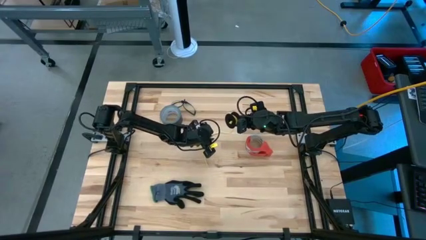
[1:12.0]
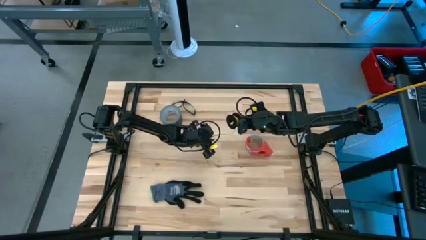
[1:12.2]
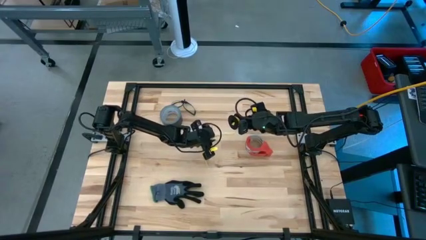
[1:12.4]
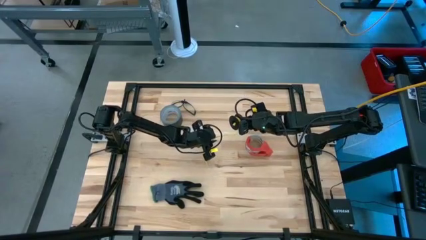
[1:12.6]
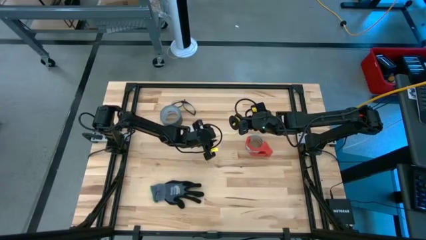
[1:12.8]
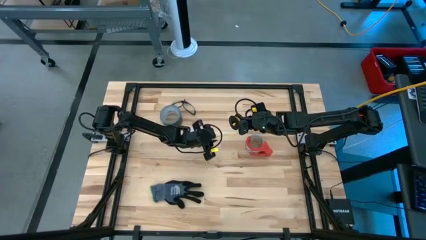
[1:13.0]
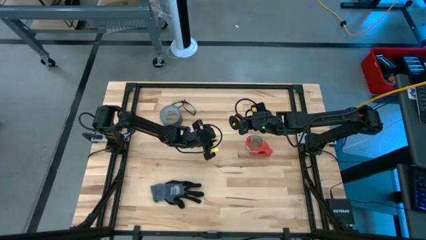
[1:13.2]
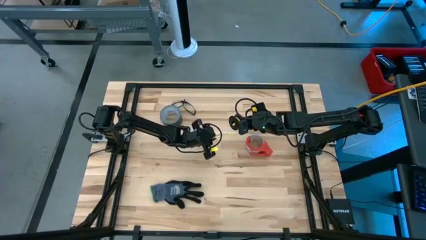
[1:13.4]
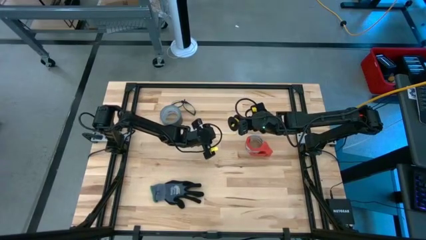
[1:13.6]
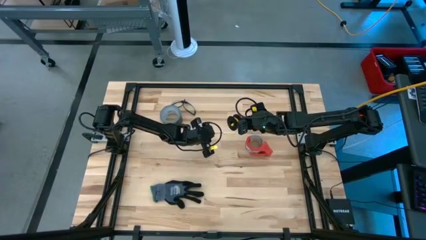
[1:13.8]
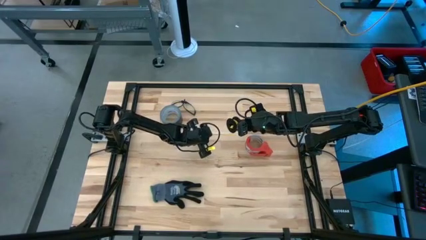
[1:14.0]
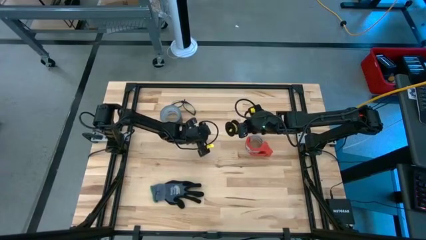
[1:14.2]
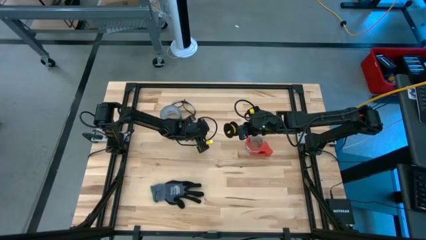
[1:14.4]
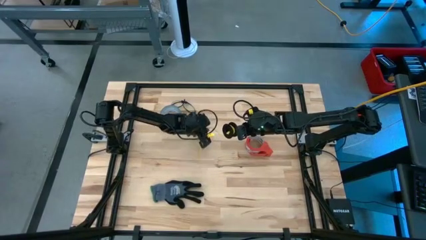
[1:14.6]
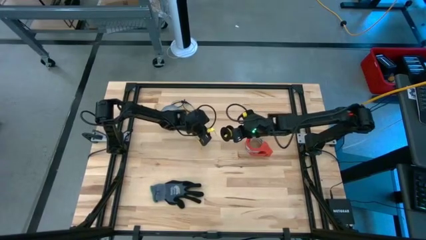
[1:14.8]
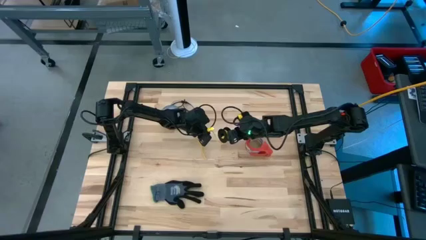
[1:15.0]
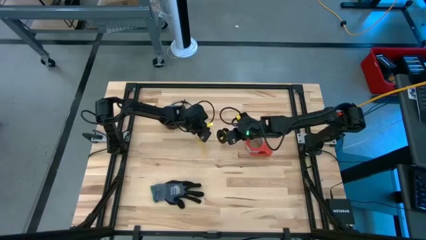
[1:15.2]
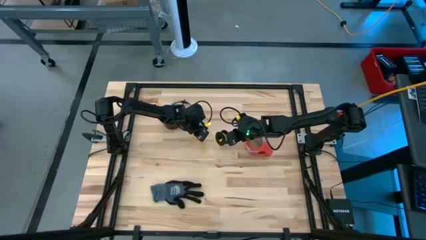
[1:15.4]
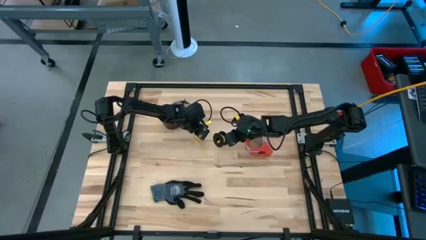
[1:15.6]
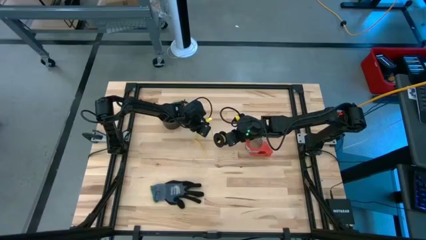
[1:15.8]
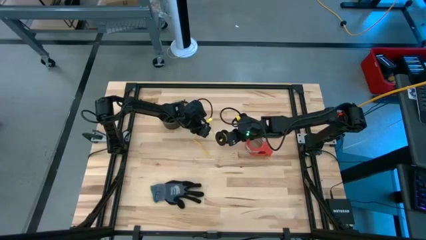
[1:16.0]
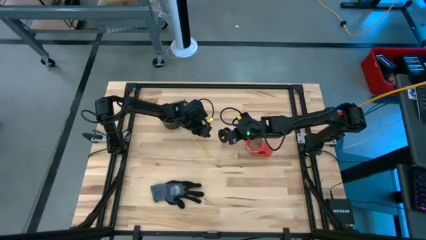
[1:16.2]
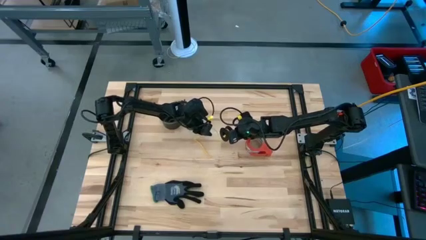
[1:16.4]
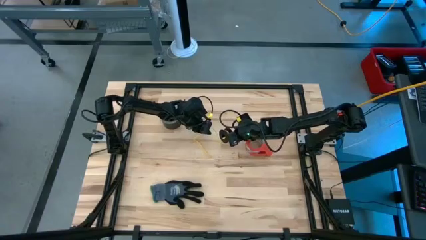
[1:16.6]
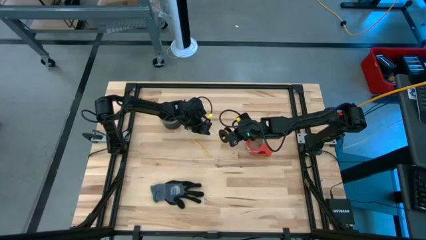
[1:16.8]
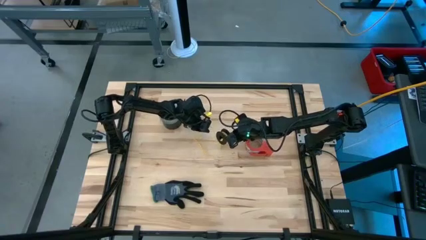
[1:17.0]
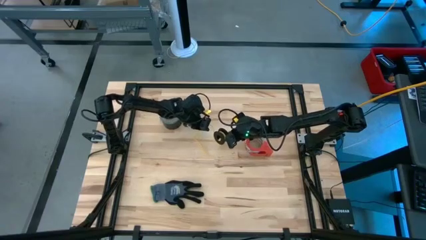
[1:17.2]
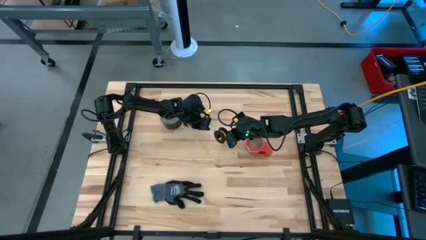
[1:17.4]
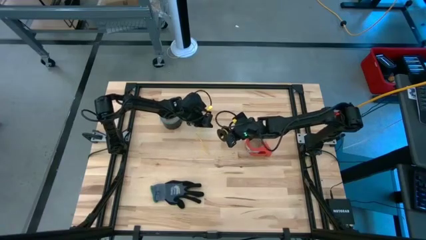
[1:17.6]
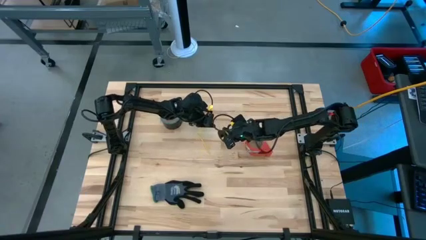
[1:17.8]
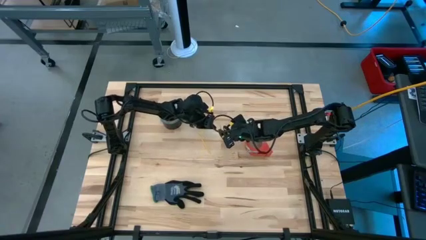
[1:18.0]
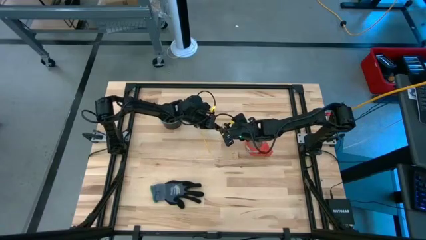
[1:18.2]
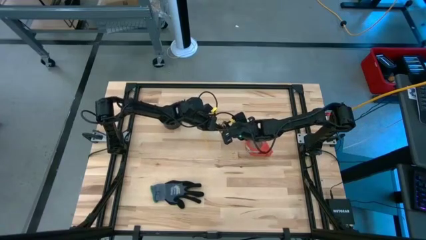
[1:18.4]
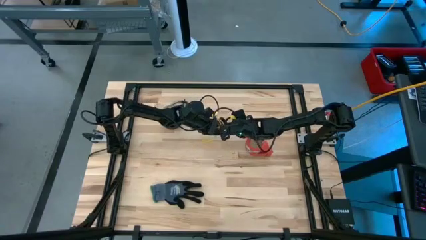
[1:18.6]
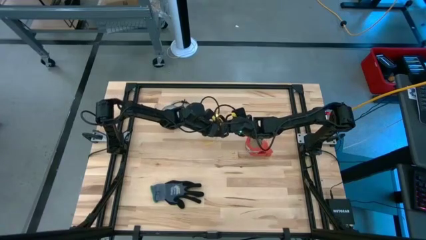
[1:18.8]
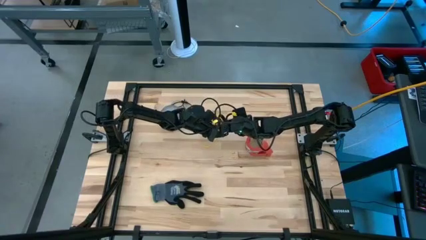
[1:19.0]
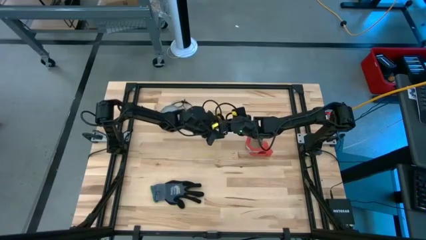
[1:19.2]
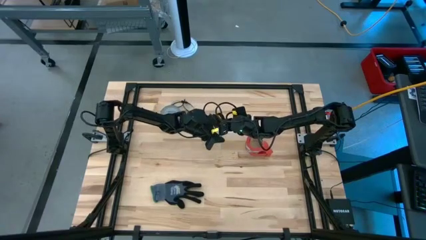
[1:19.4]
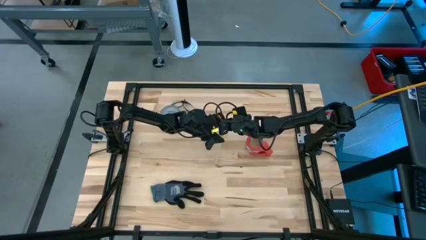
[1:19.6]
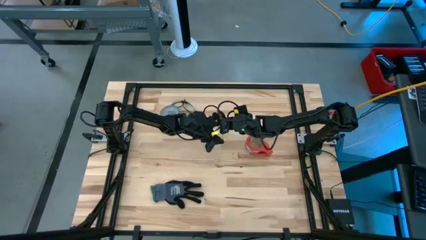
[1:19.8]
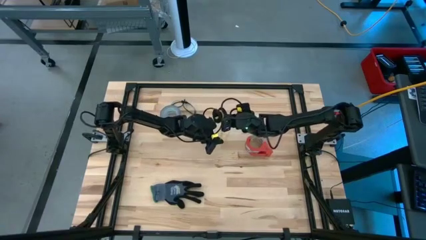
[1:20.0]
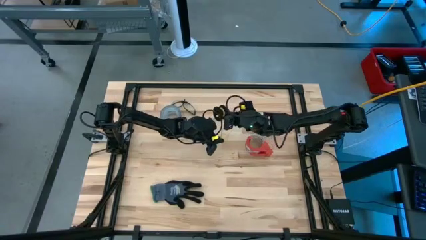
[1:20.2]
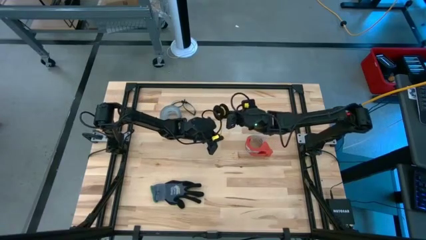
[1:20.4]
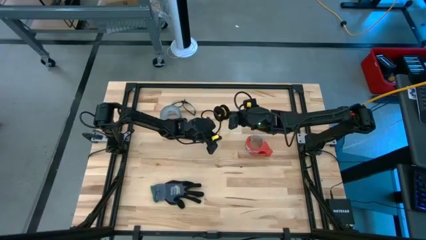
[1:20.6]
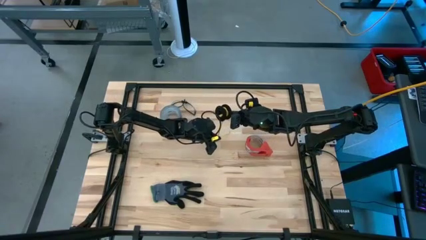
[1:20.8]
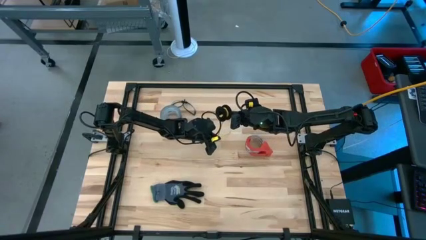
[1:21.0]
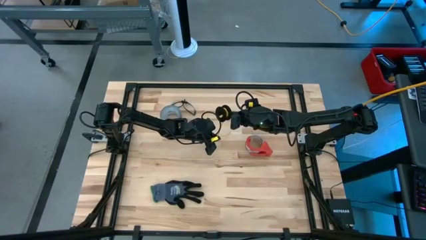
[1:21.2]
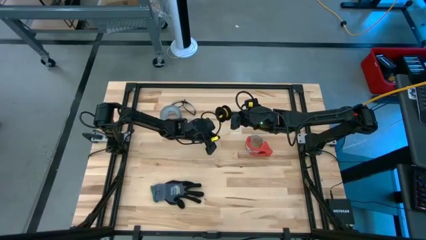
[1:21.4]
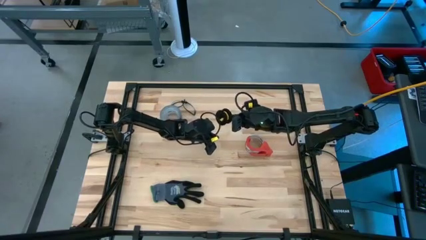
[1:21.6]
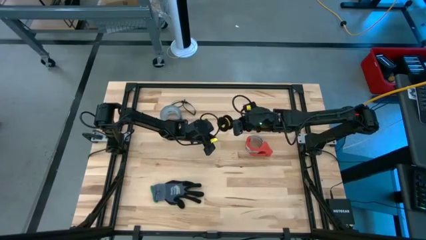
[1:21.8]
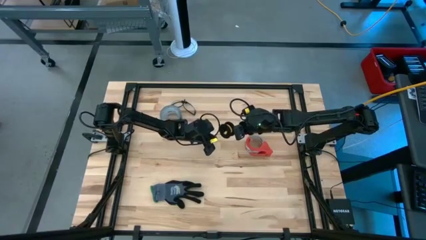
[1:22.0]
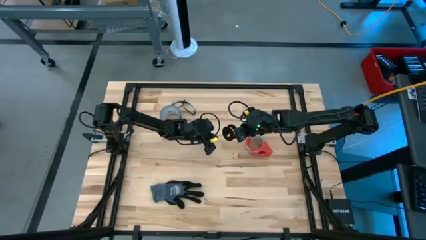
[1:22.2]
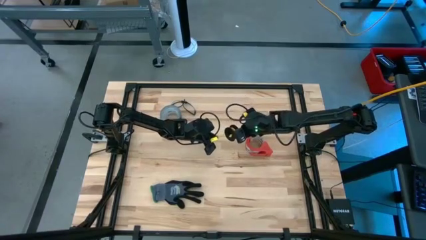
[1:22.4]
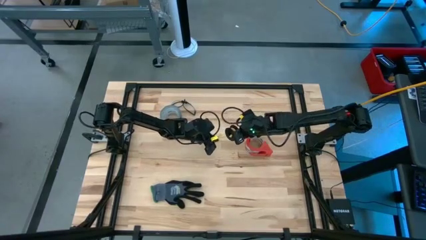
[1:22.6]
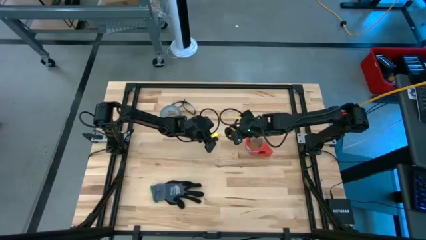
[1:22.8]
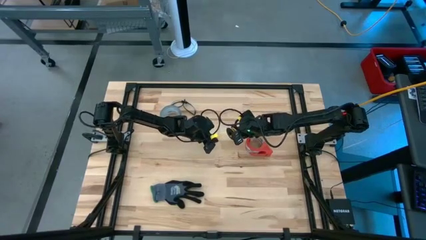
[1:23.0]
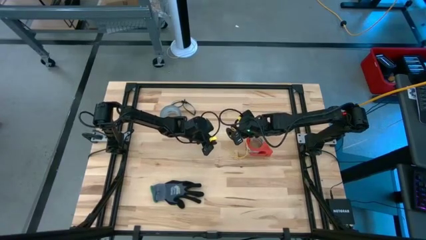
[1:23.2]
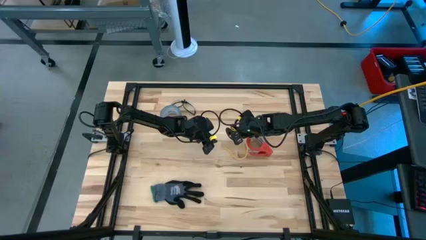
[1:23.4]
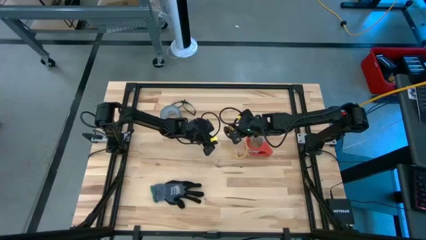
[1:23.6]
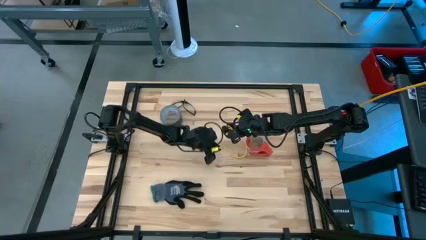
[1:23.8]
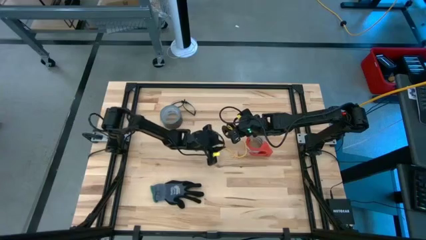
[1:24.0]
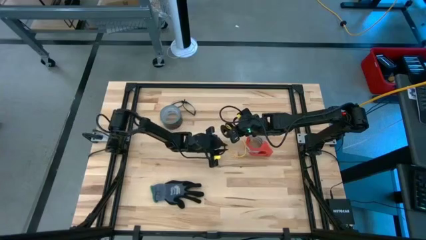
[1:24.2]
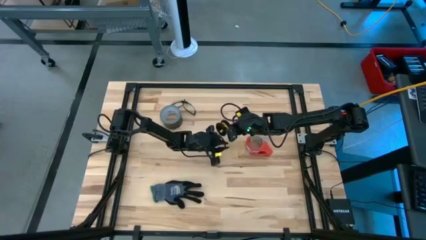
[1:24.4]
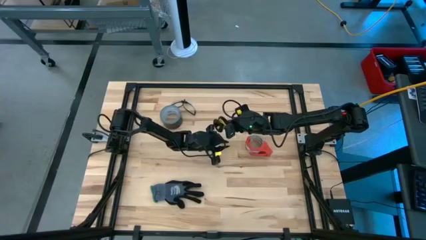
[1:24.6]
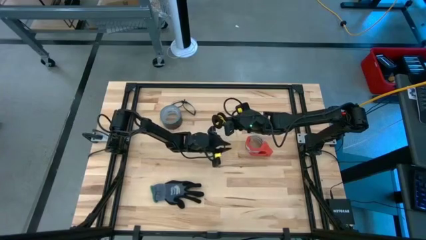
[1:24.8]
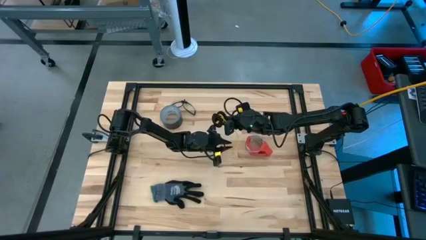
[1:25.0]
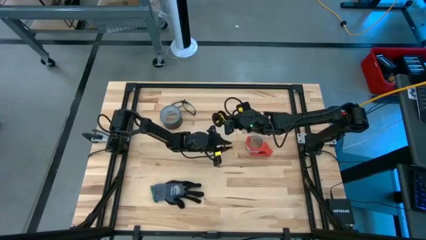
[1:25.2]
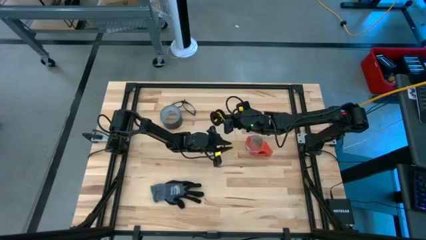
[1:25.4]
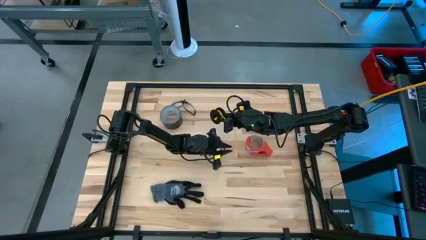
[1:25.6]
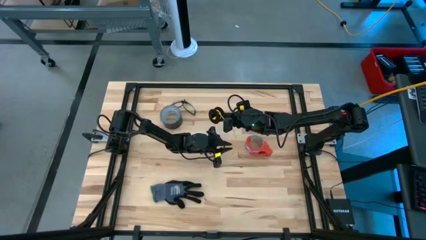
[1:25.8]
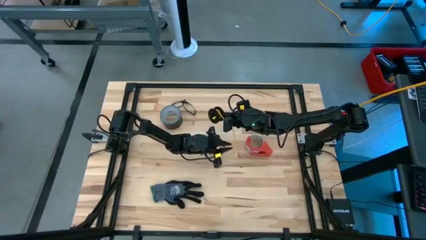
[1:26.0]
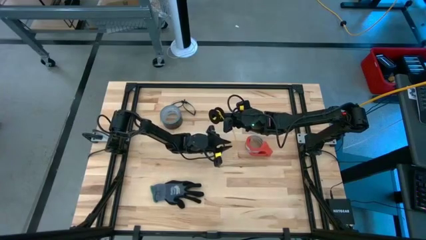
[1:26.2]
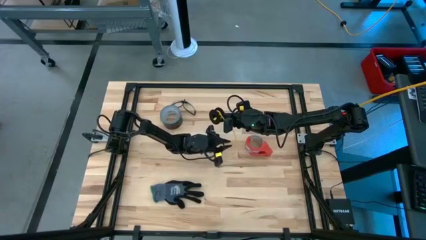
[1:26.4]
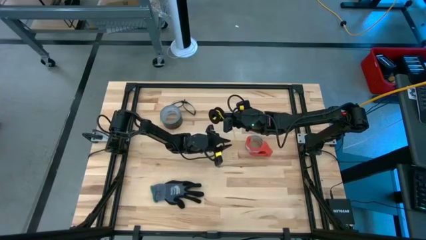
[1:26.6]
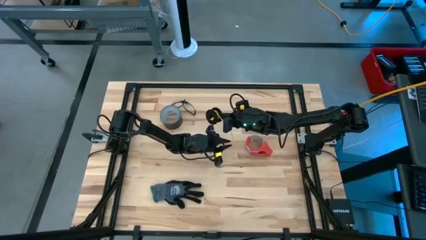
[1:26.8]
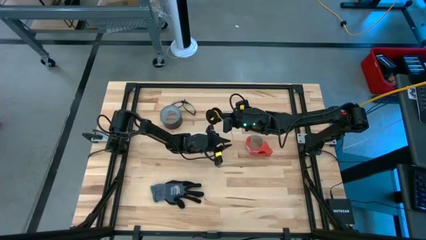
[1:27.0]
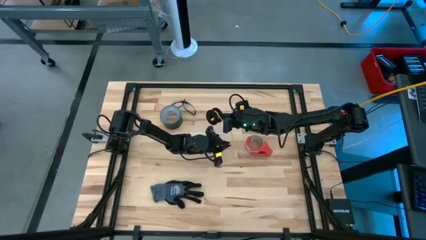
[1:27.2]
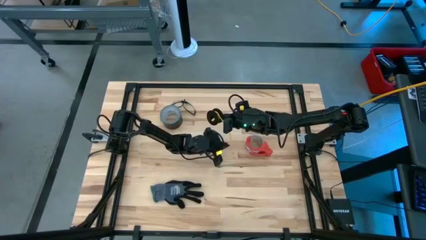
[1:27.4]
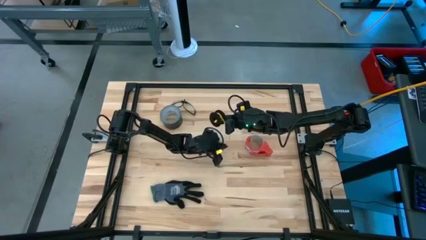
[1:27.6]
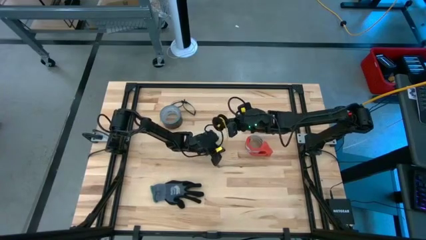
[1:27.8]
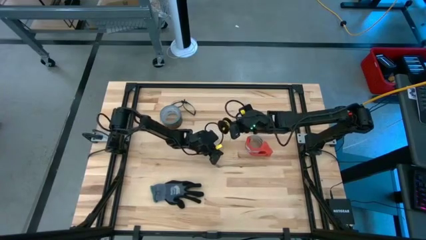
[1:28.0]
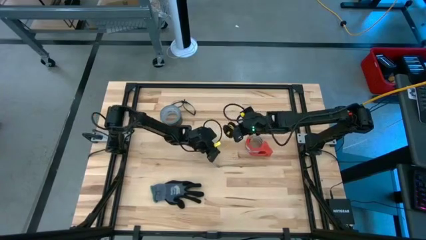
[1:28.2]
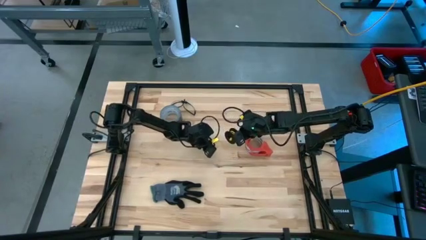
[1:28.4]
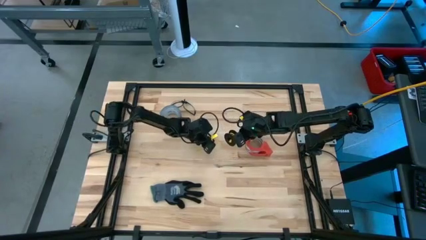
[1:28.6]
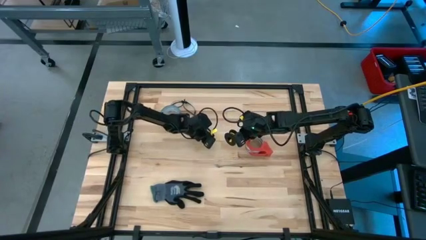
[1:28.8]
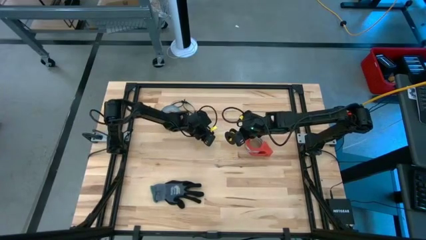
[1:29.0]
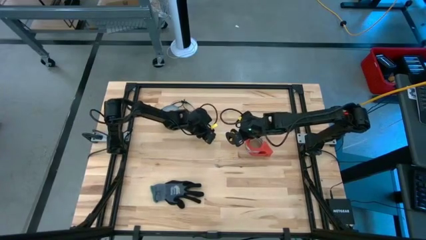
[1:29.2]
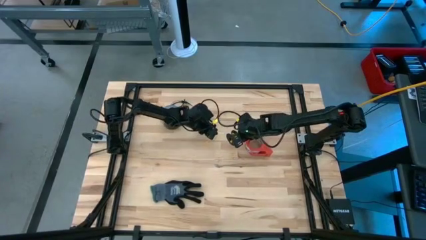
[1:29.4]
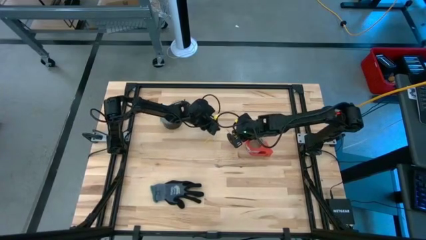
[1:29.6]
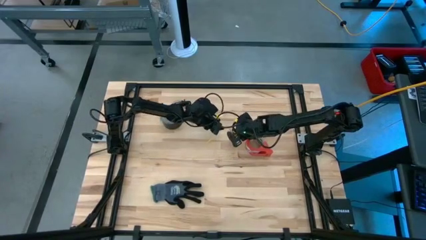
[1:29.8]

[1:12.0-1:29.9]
Task: Coil cords
Coil the yellow wire onto the spool
